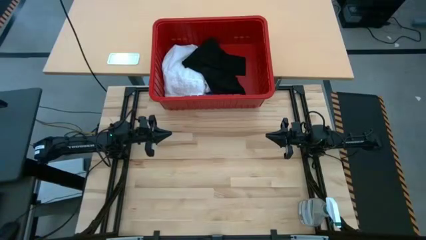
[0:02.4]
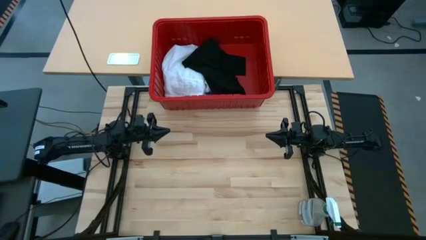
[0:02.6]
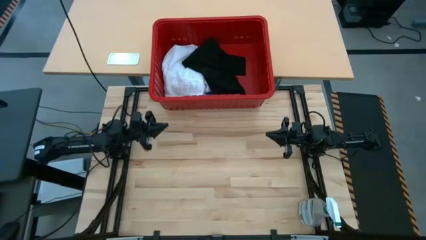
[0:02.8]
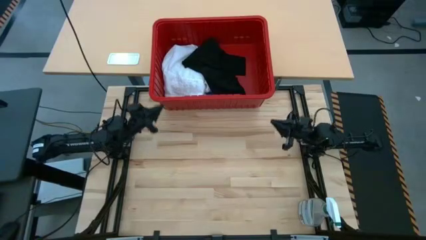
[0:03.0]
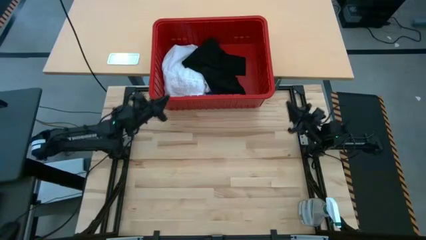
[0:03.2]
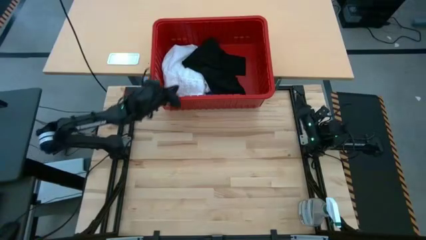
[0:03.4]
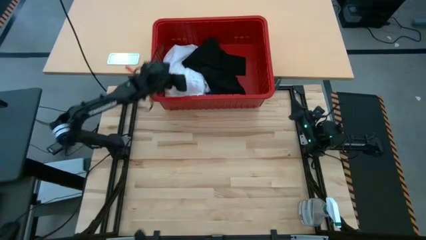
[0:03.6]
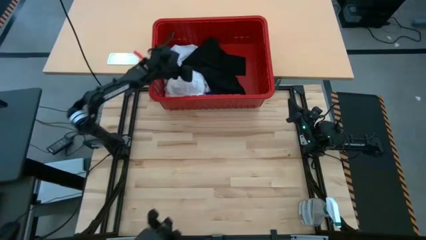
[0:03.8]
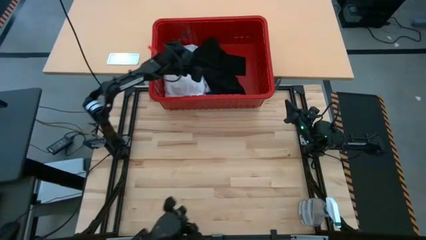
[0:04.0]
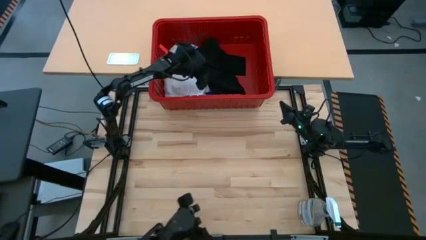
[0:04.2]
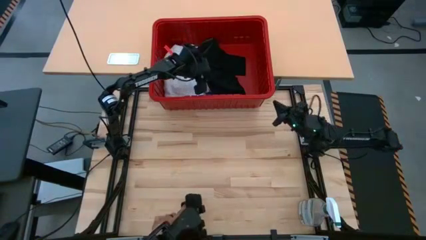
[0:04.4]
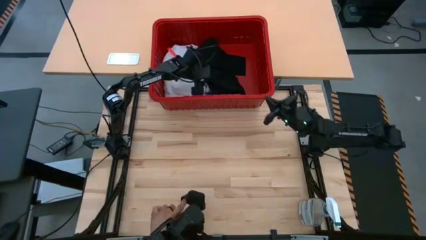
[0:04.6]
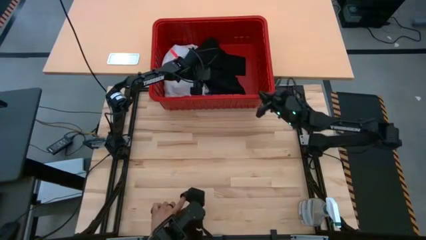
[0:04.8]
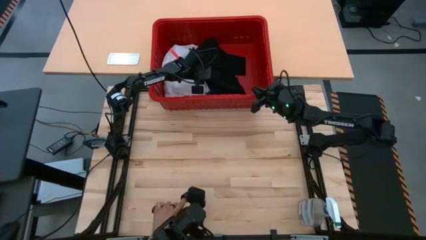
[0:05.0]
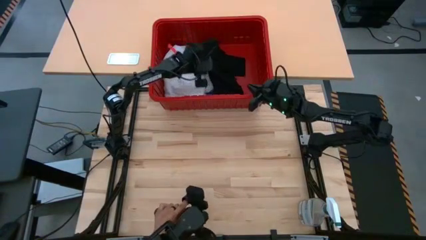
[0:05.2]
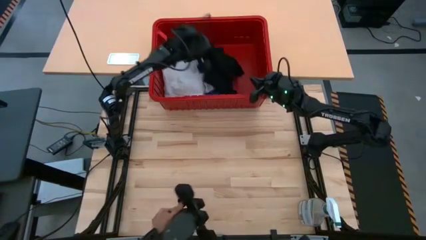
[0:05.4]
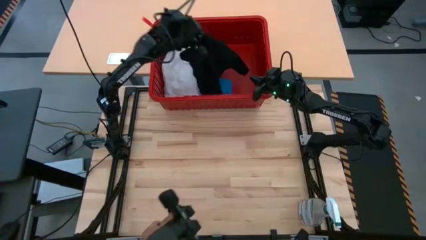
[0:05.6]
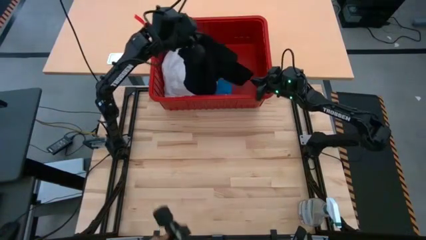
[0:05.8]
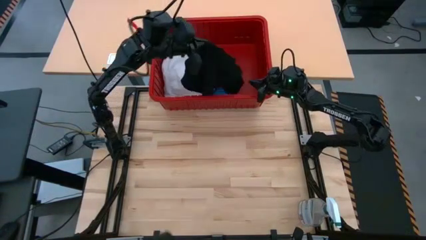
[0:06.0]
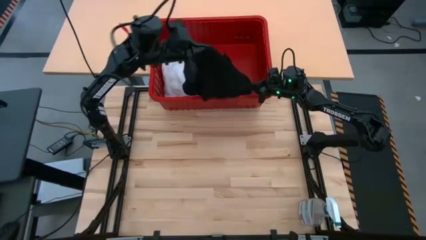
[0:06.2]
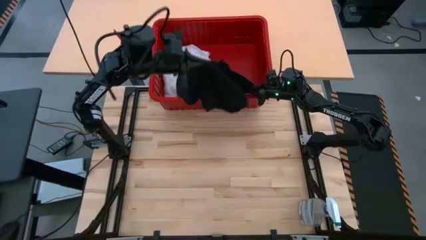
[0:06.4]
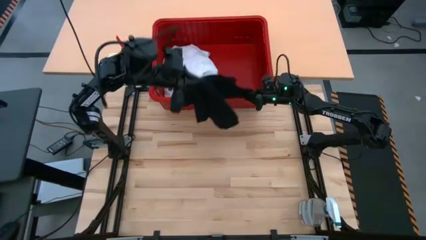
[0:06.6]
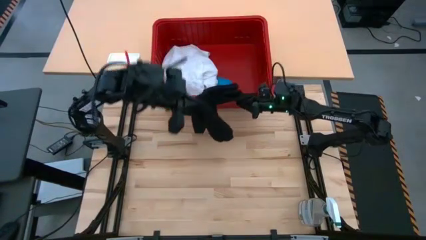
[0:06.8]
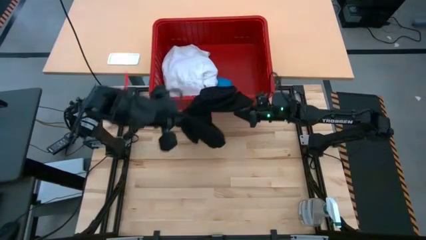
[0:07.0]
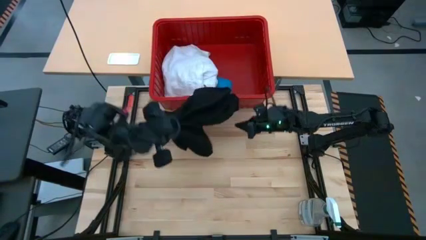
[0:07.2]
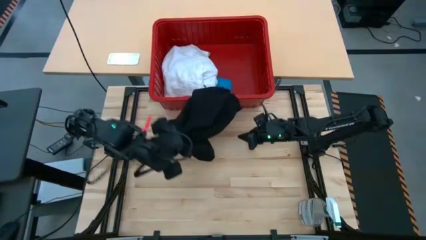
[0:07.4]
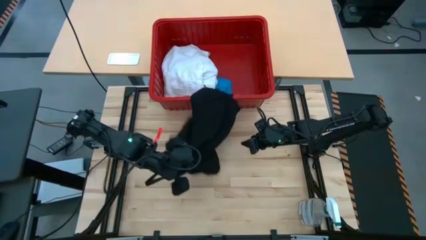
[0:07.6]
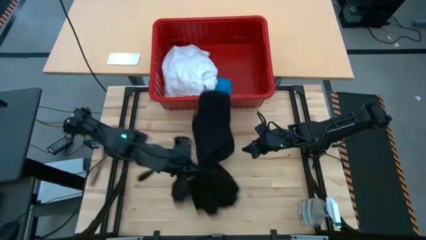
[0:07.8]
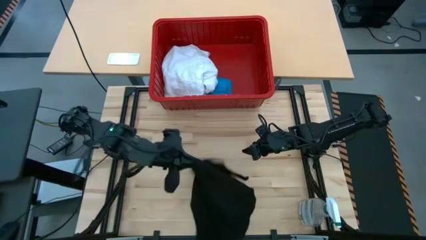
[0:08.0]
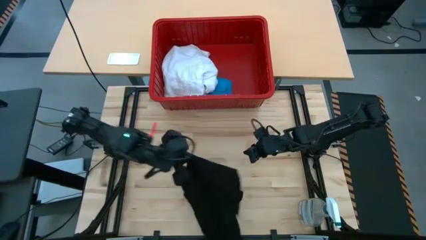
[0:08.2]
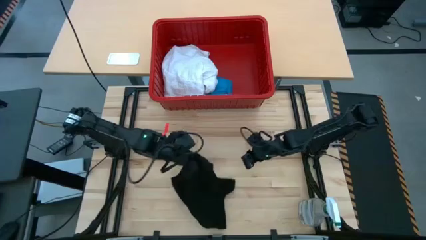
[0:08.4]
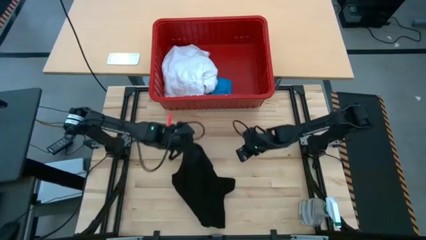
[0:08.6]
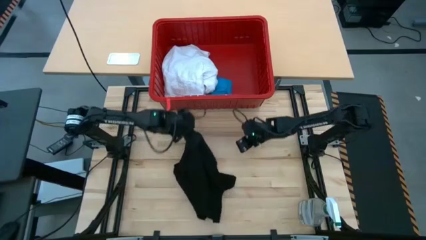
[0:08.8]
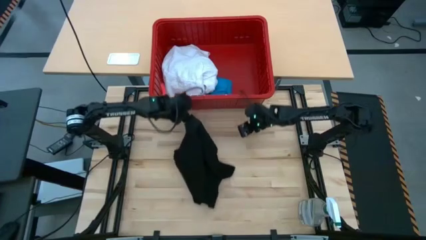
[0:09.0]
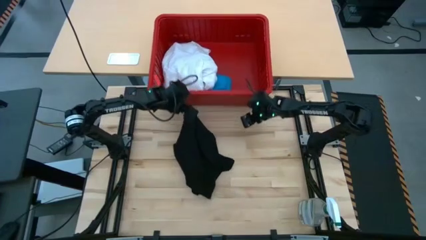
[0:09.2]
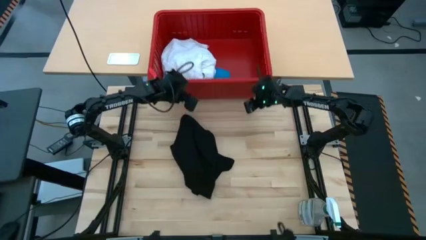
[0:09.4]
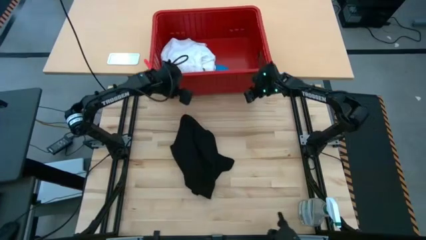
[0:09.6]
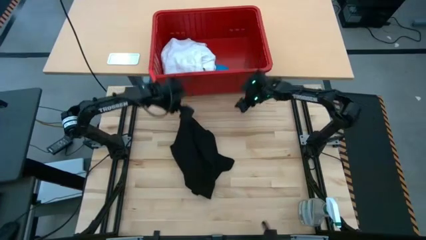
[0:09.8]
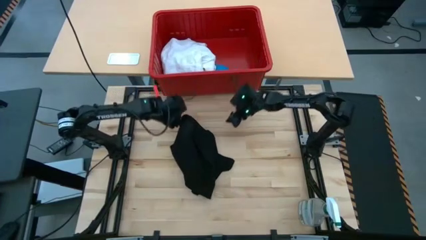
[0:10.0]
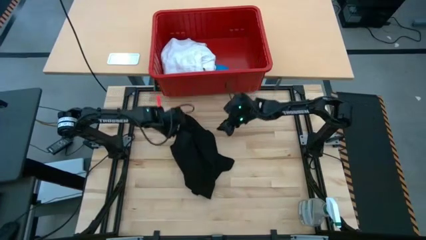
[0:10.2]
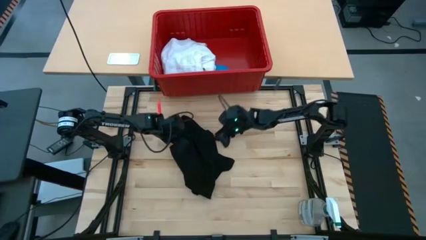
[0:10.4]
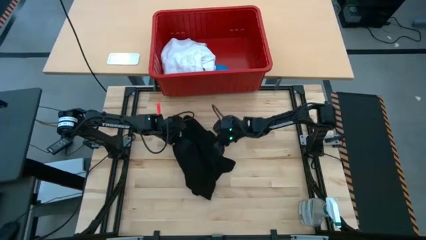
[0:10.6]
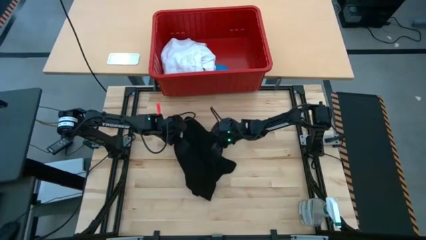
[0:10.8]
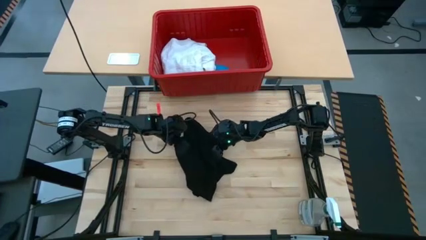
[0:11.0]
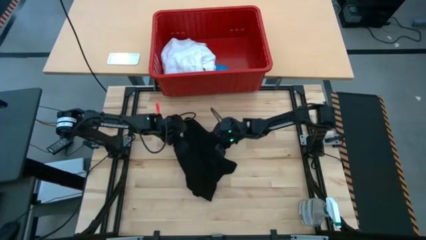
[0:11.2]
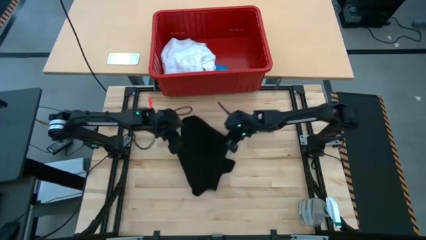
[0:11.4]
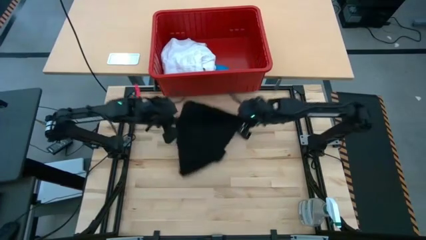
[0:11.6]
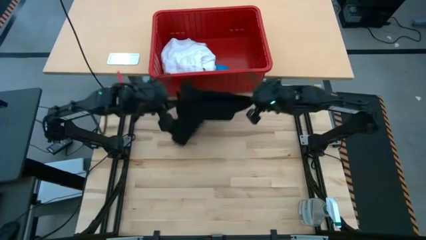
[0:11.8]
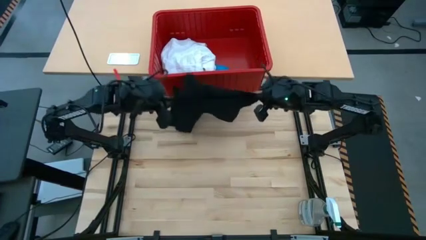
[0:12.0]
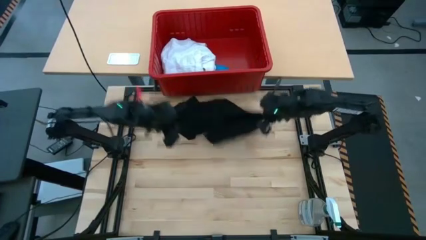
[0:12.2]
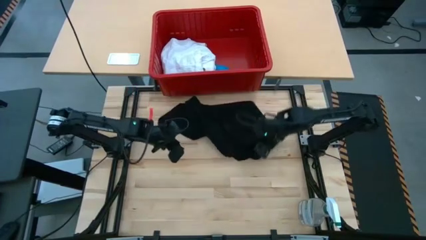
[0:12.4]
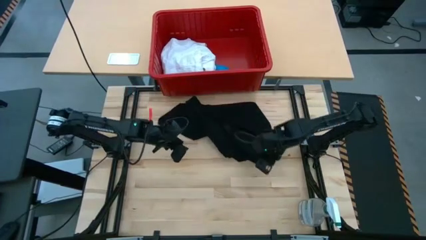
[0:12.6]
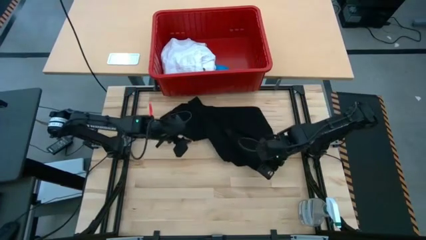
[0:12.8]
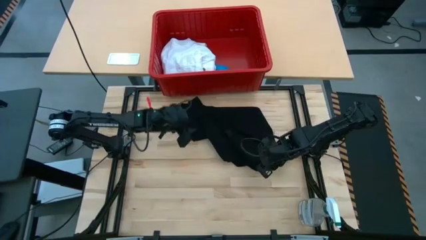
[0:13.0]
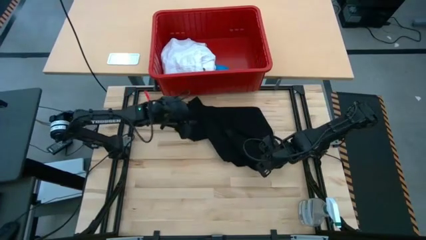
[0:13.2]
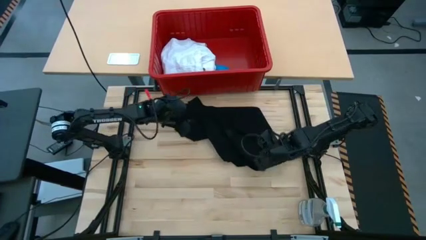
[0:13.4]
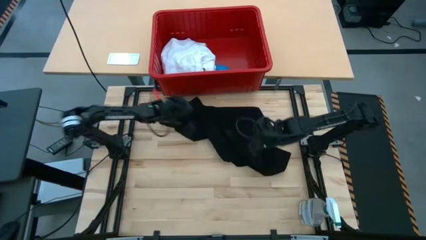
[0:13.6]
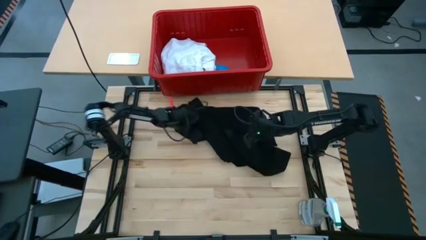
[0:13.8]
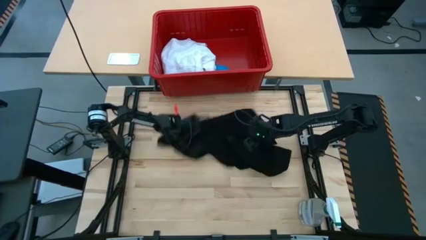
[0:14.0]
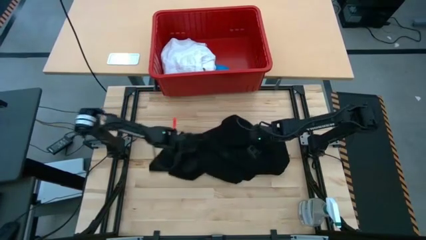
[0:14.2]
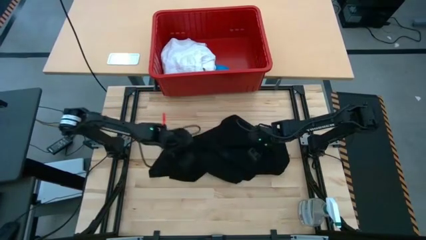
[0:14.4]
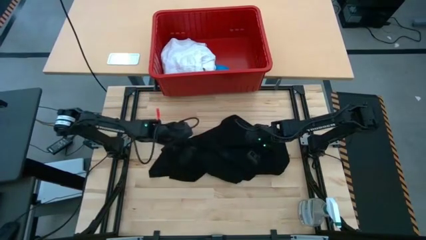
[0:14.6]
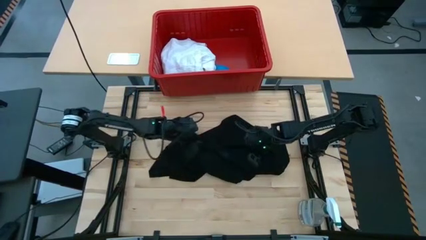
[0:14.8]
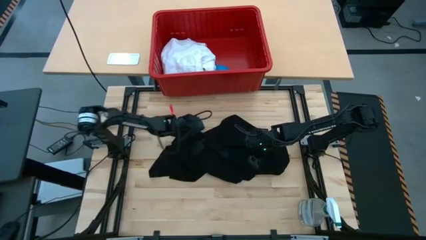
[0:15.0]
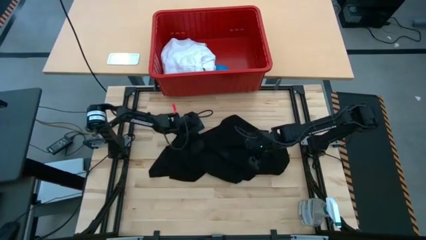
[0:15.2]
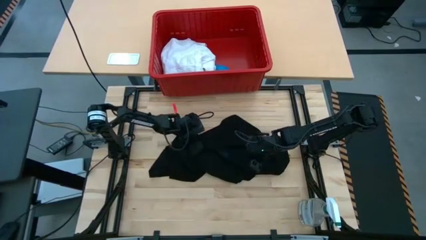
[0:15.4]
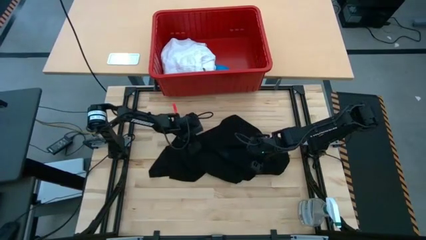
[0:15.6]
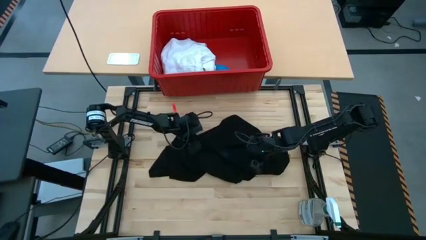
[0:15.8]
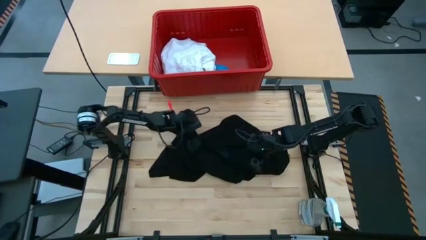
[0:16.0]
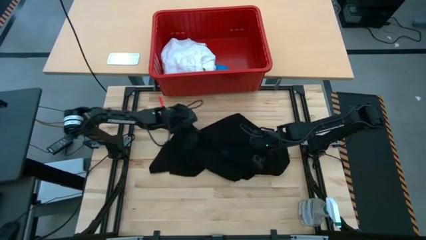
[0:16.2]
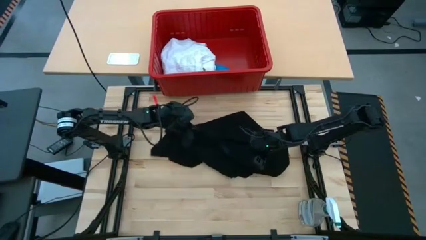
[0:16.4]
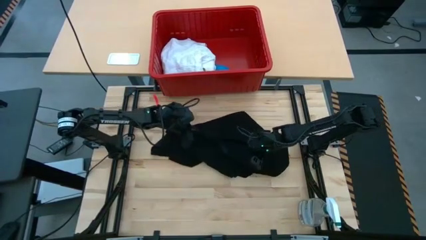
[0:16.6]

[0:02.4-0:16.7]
Task: Fold laundry
Fold the black shirt
